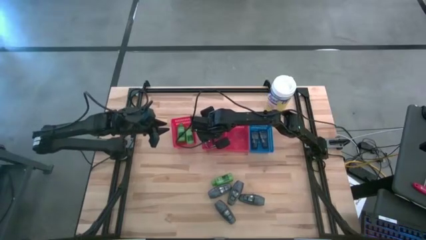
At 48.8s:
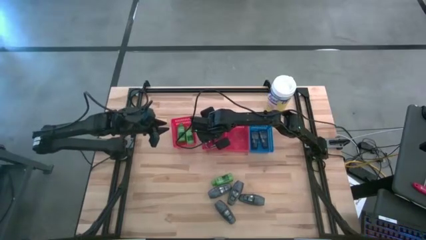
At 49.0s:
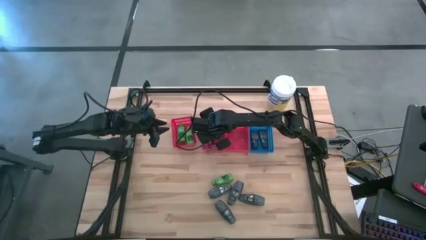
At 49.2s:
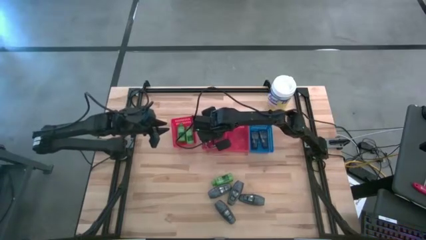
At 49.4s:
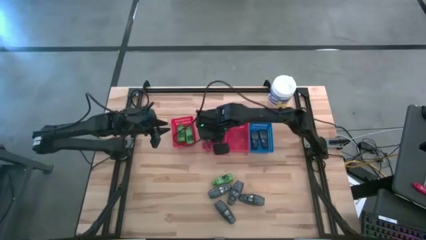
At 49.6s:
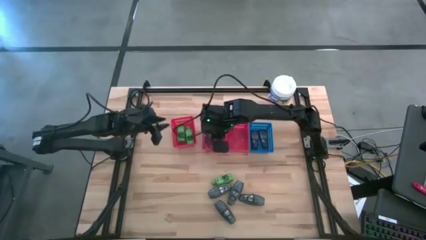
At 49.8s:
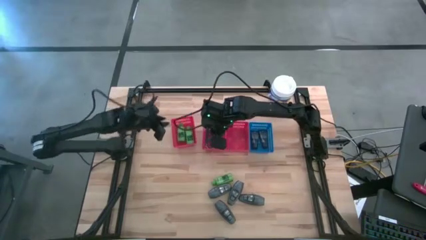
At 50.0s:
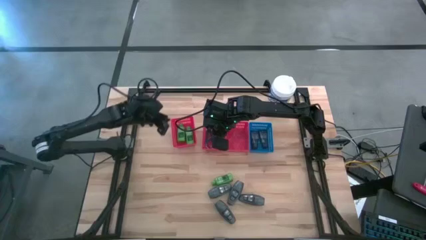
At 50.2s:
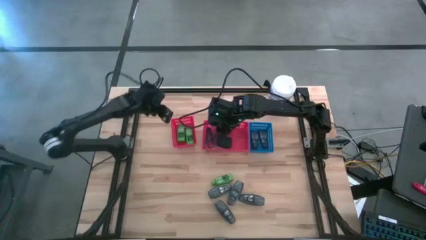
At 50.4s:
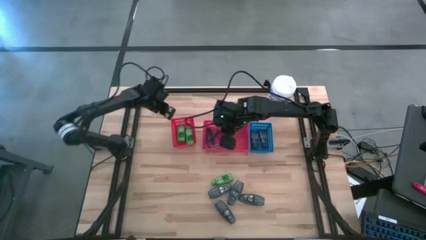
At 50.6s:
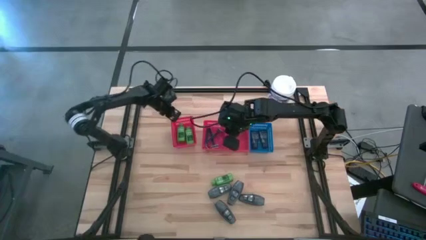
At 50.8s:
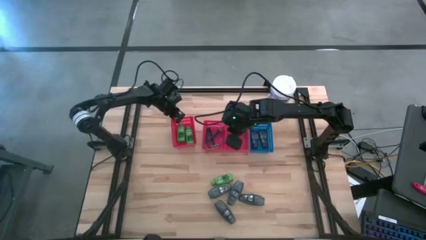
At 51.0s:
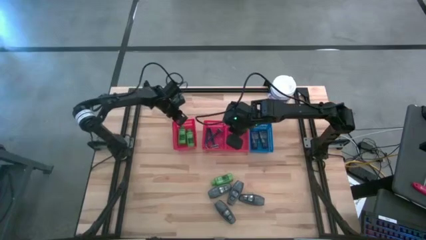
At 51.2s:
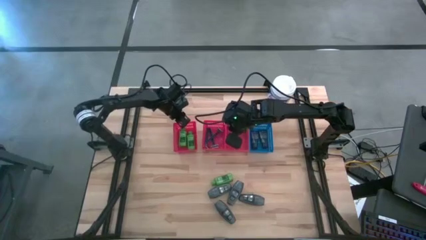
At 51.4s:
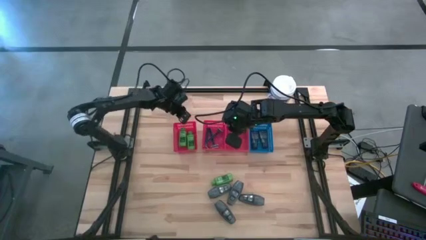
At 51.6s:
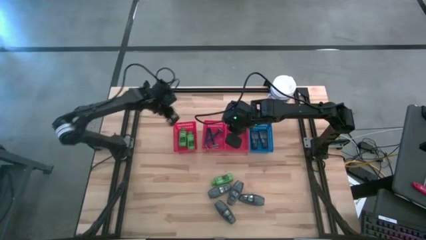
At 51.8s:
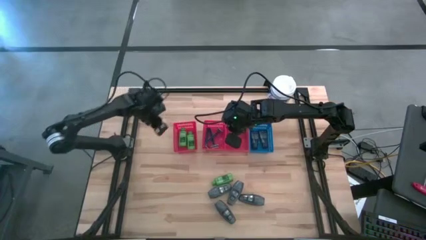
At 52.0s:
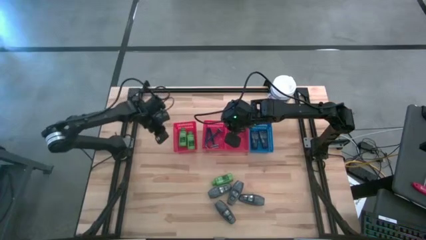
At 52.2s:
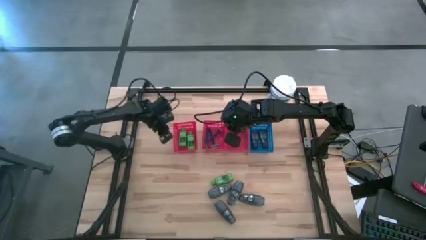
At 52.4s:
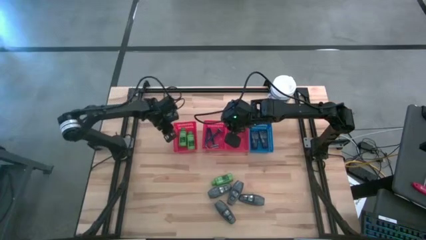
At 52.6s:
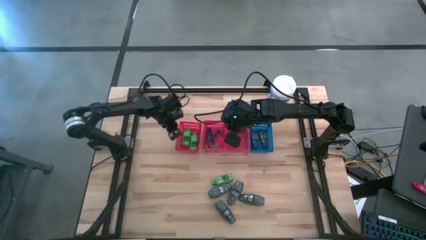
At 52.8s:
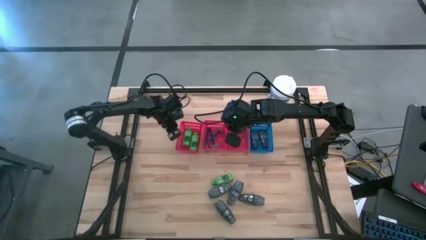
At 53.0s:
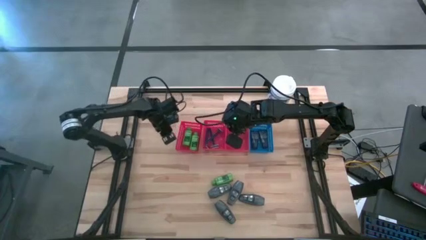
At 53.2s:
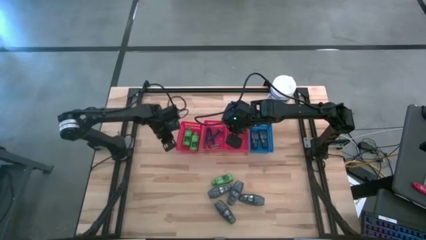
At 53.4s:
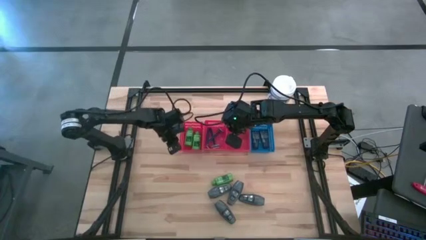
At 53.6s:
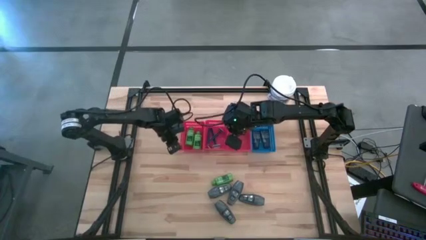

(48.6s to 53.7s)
Task: Pick & Place Travel size toiletries
Adjust the left red bin

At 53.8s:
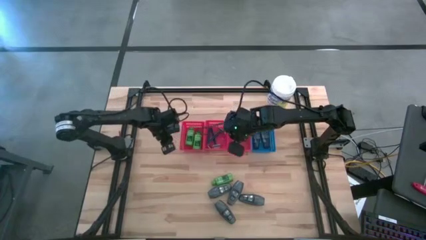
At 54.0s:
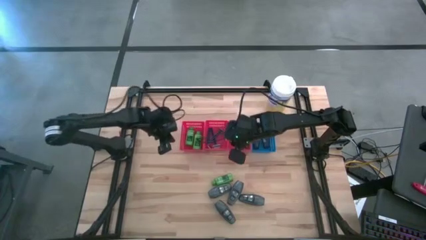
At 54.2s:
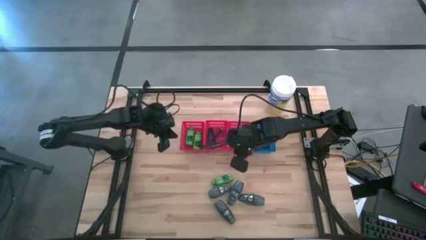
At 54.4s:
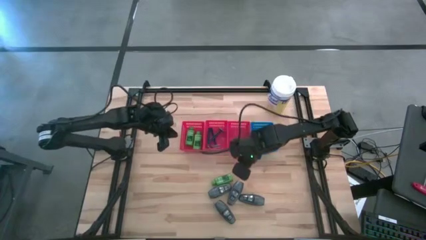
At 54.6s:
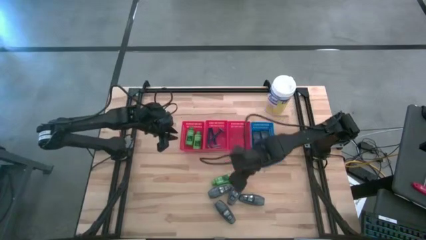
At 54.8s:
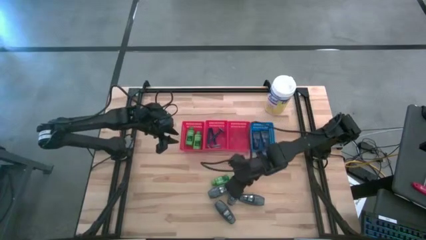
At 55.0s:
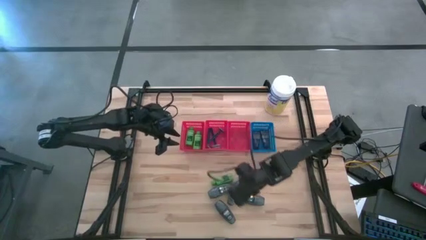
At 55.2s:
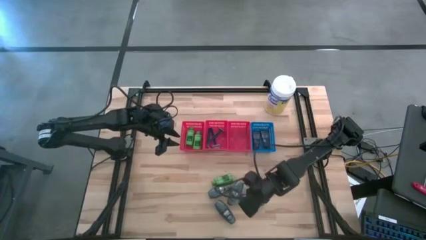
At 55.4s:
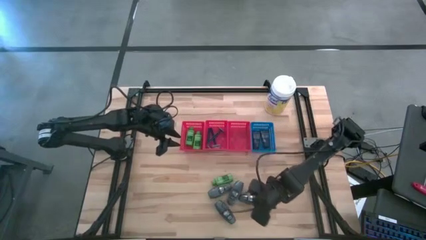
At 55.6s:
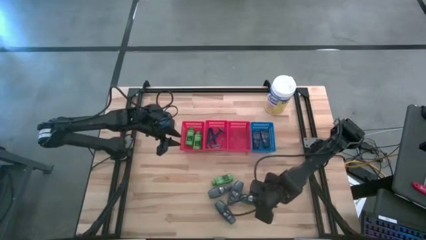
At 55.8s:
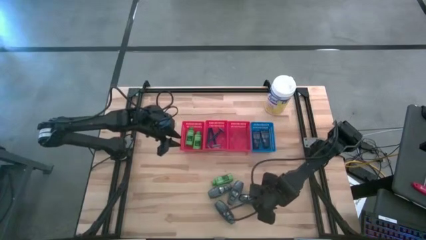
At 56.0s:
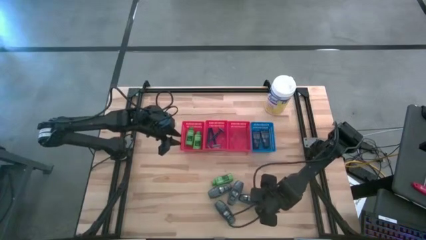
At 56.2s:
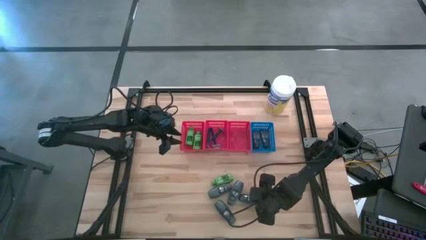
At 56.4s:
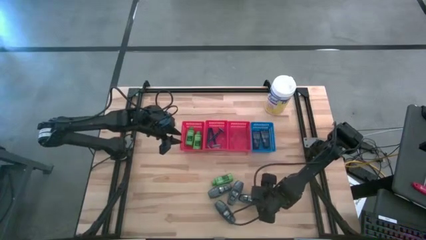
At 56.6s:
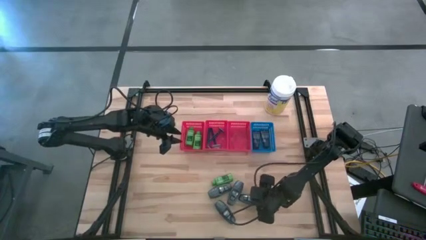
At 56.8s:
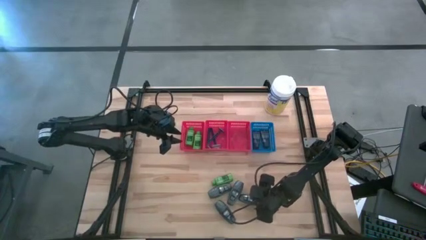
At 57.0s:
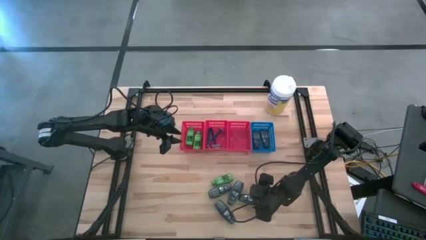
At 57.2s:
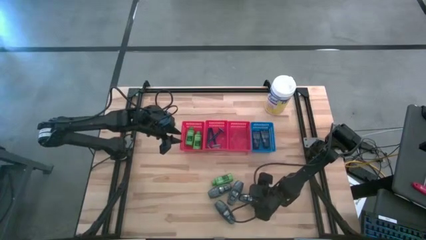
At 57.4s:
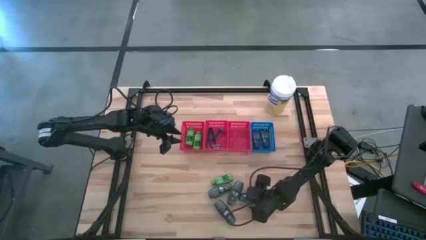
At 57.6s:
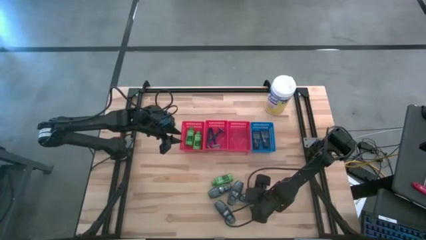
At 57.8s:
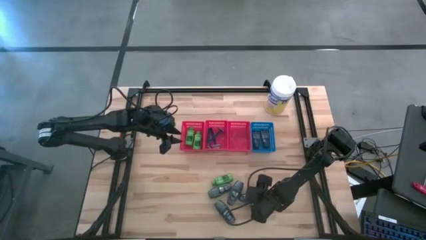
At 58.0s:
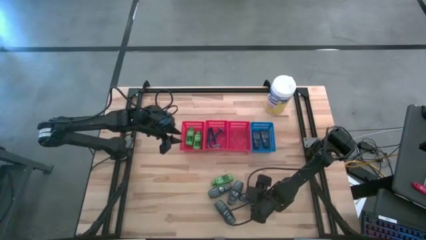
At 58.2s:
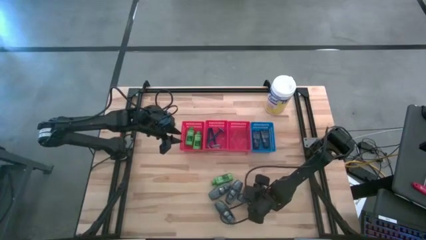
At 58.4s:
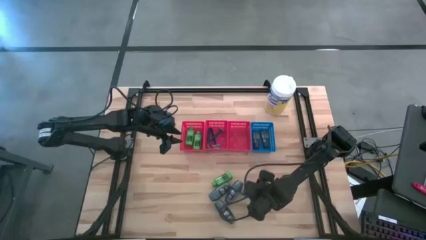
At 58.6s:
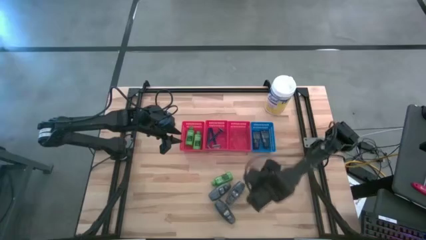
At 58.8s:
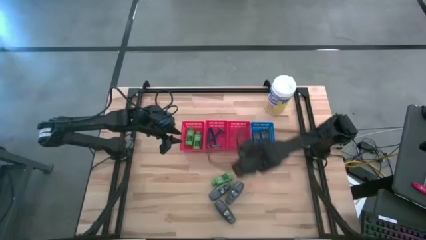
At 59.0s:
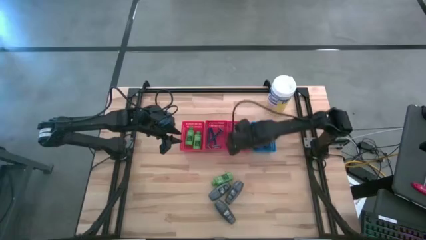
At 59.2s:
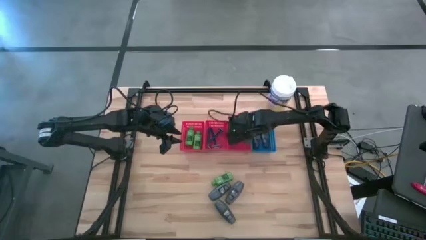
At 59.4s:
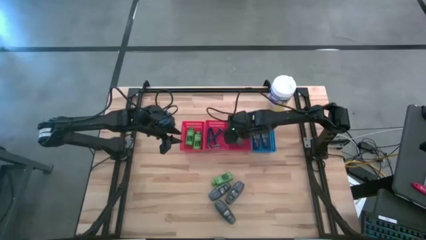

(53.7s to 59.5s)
Put the gray deodorant into the right red bin

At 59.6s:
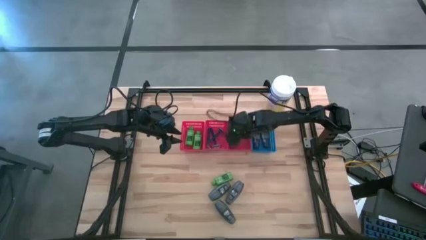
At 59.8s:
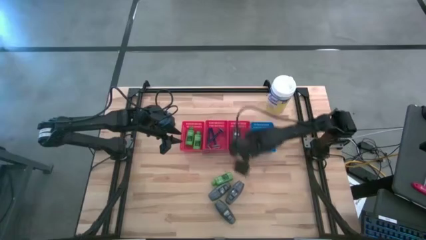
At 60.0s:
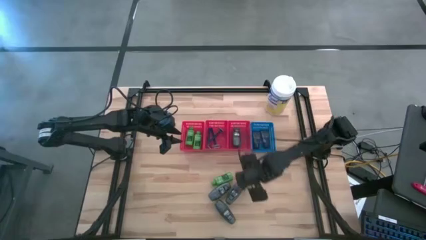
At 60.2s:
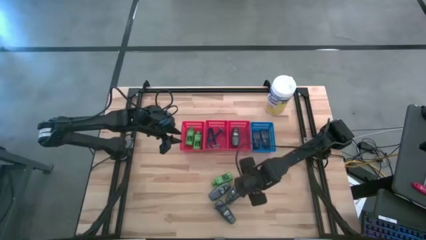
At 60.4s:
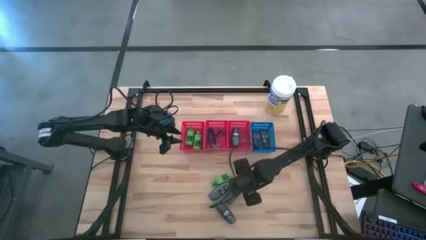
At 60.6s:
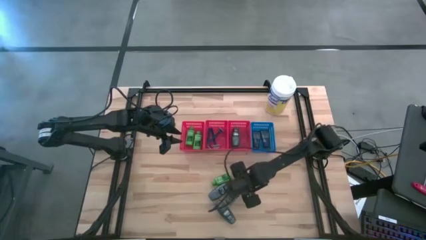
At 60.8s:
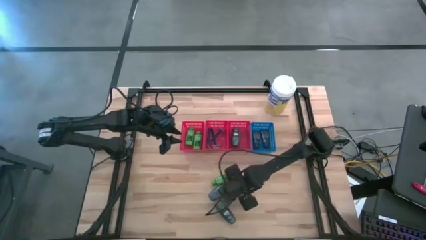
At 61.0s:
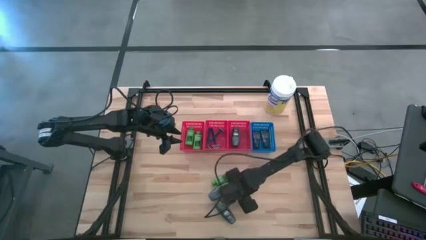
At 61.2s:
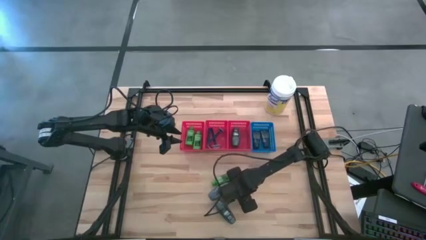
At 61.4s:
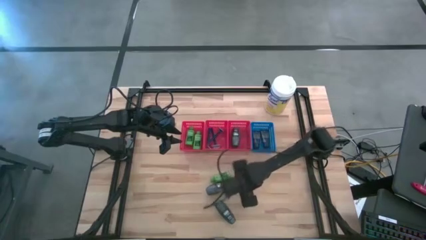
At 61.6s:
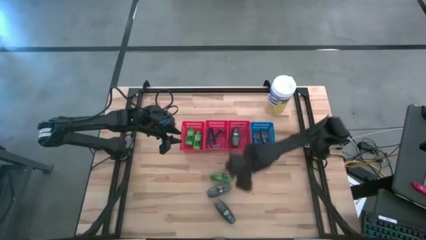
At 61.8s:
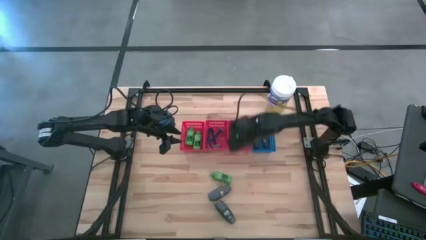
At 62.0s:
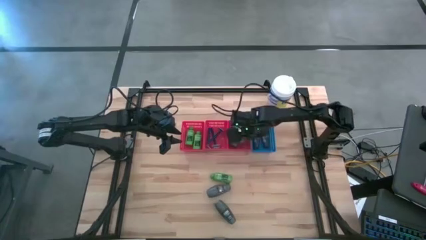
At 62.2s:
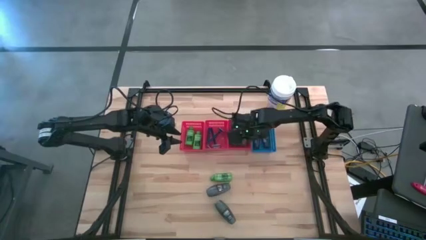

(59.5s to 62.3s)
Put the gray deodorant into the right red bin

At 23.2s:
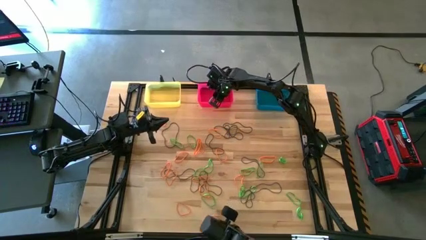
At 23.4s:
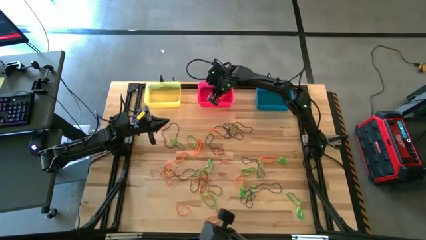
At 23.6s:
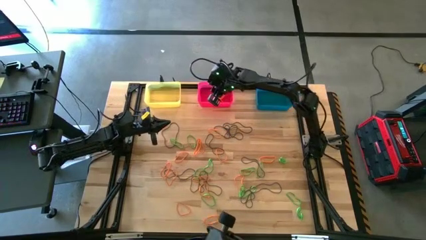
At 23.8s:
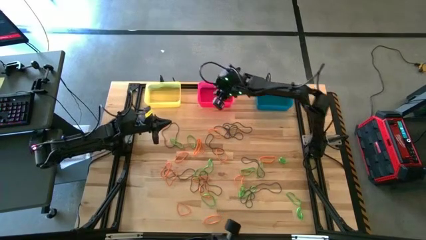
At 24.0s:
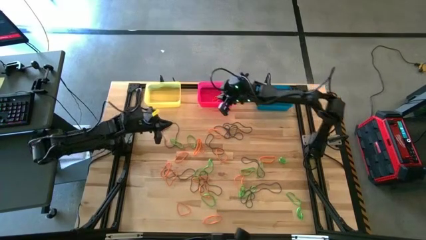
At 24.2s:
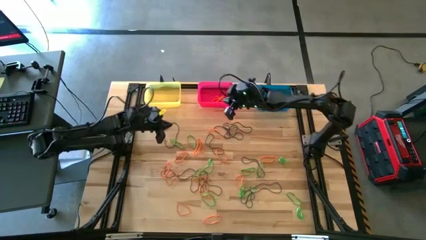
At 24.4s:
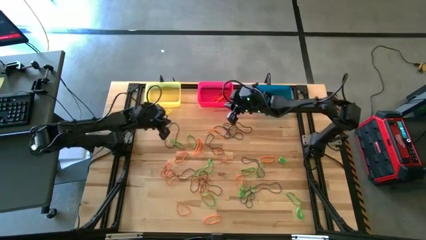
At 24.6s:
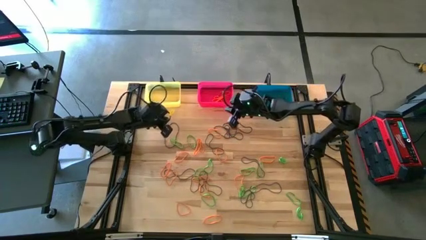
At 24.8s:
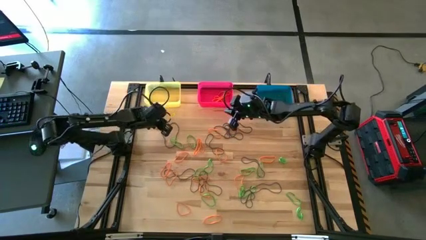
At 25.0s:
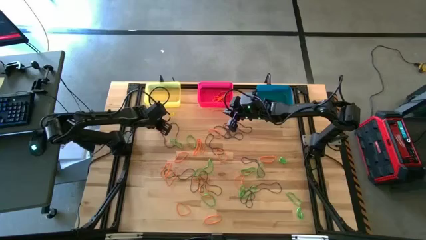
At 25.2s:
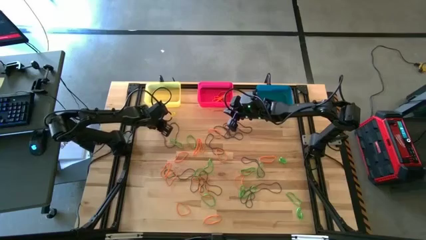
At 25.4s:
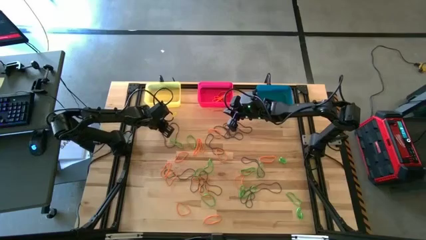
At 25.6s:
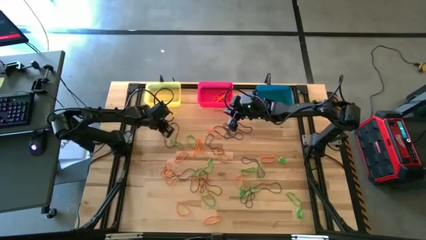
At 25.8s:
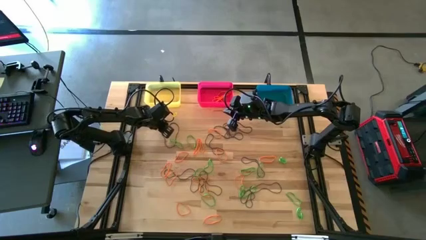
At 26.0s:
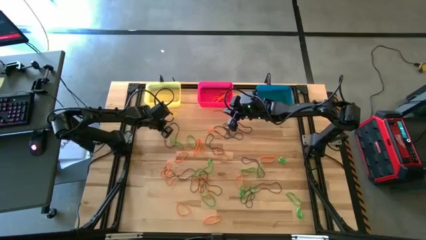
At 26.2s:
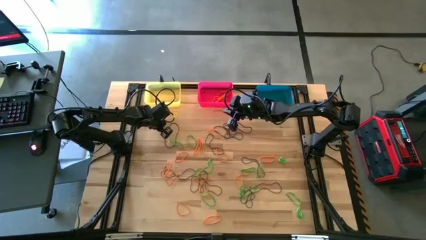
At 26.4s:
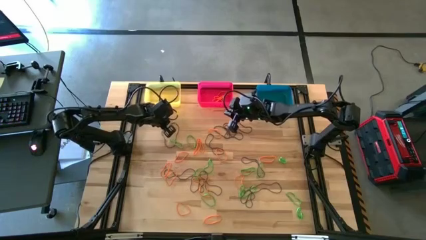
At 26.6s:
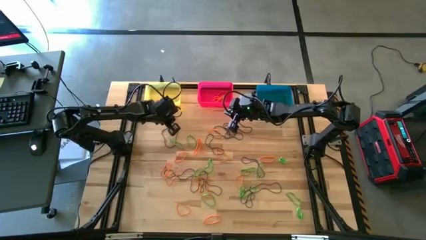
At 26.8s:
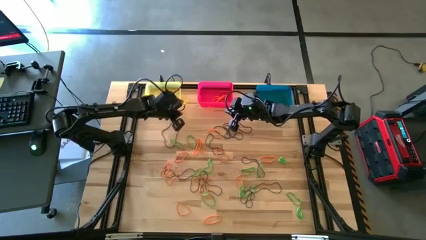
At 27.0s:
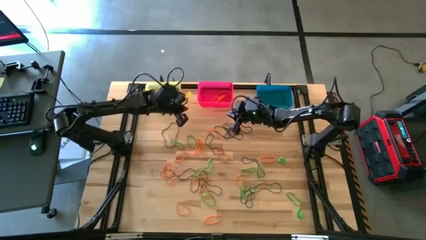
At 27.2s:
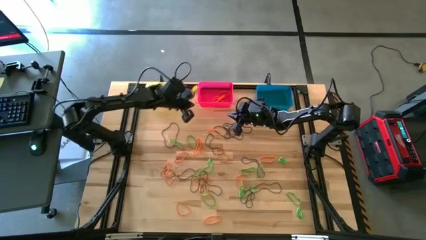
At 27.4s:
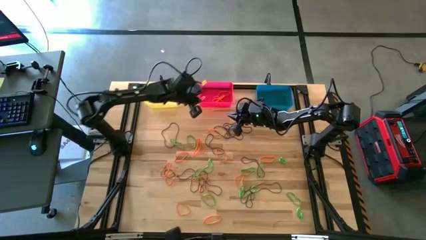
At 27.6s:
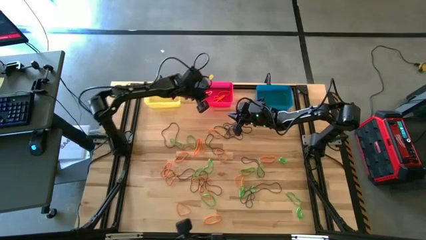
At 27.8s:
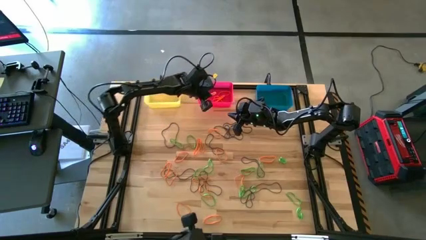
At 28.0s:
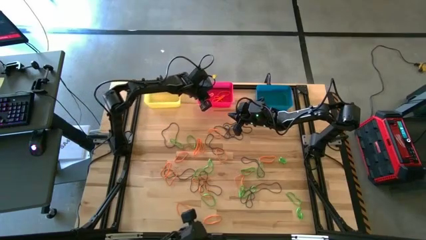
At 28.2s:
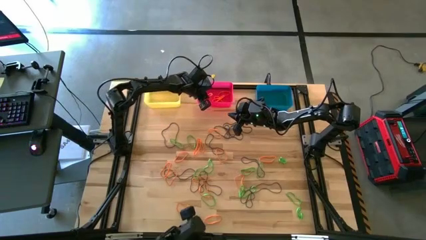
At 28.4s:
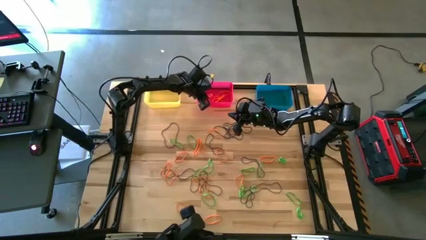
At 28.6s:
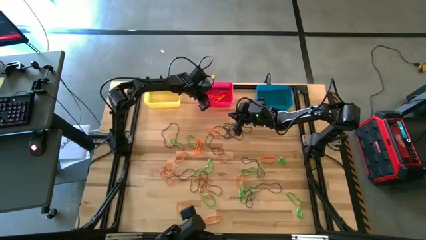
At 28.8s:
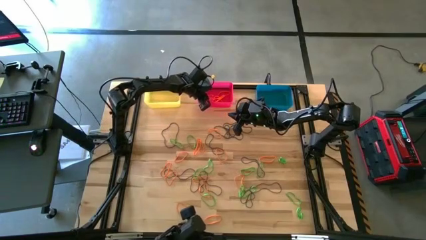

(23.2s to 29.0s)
Task: Sort rubber bands into baskets
Put the orange rubber band into the pink bin
